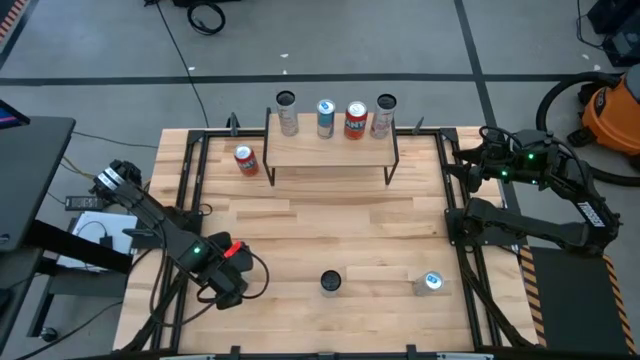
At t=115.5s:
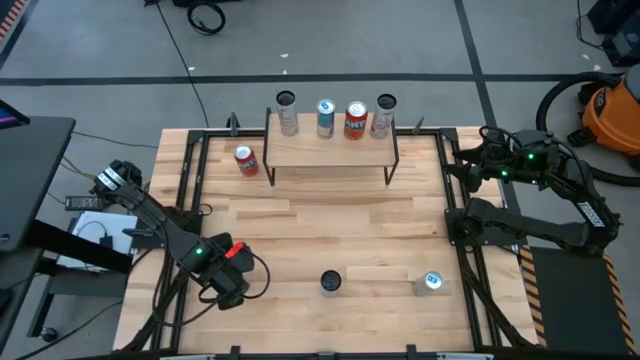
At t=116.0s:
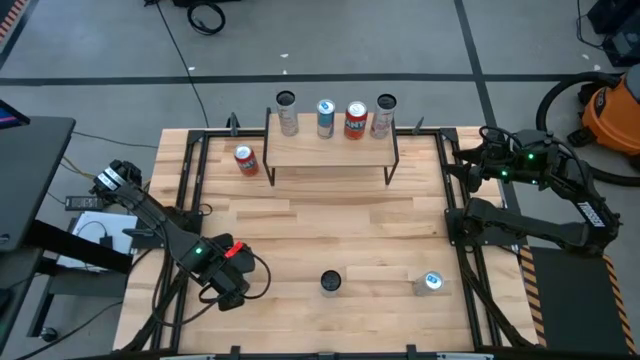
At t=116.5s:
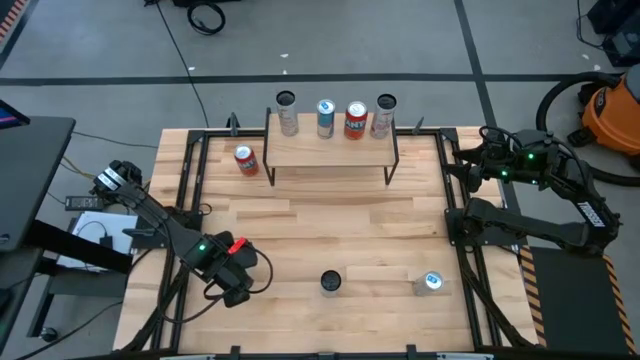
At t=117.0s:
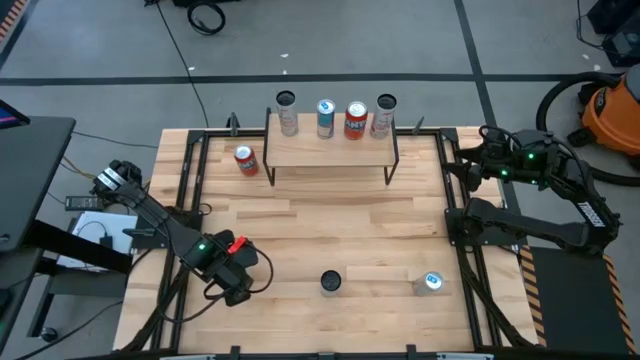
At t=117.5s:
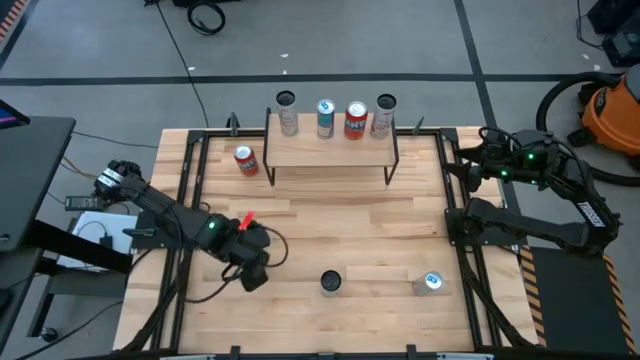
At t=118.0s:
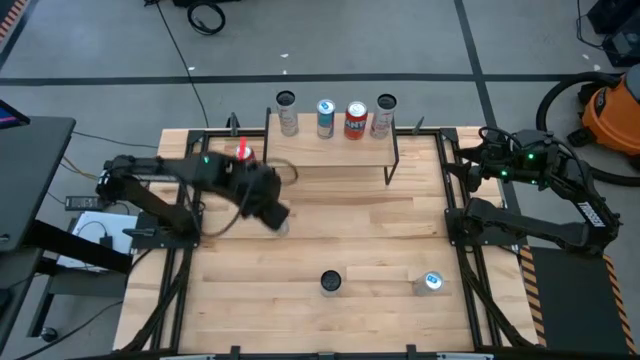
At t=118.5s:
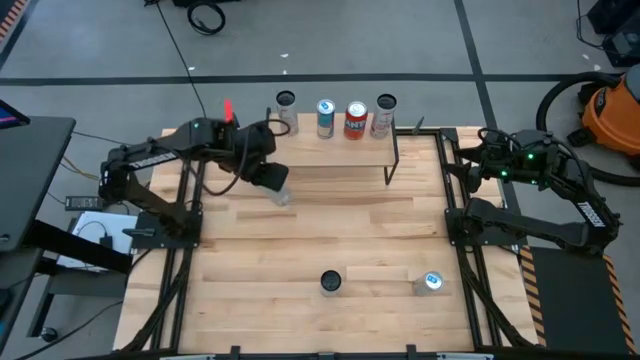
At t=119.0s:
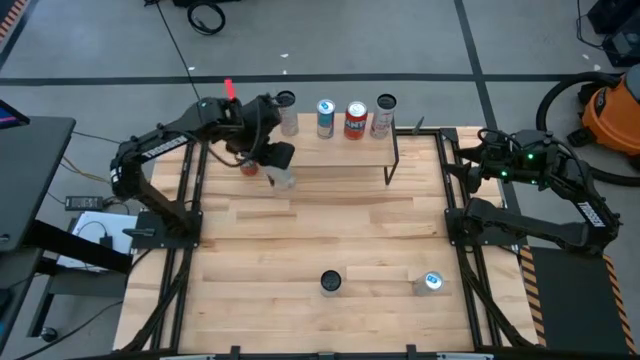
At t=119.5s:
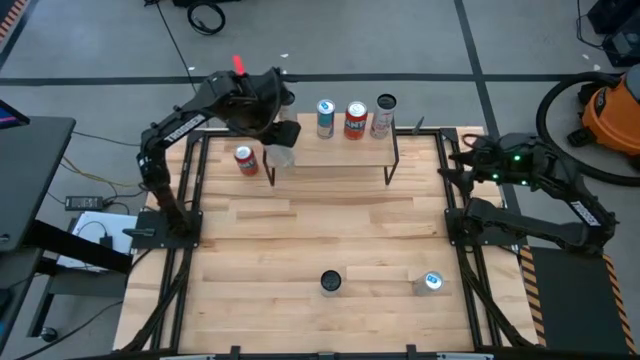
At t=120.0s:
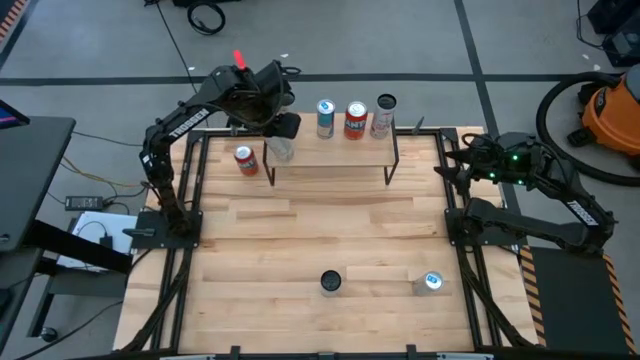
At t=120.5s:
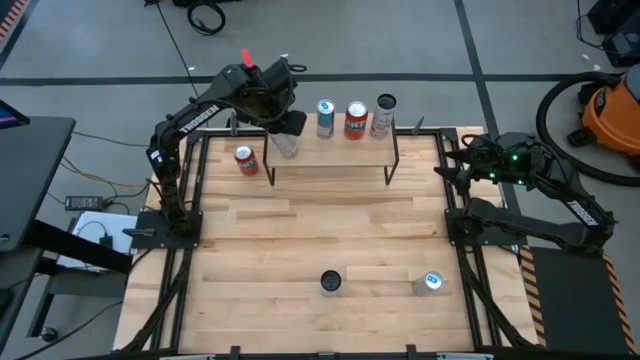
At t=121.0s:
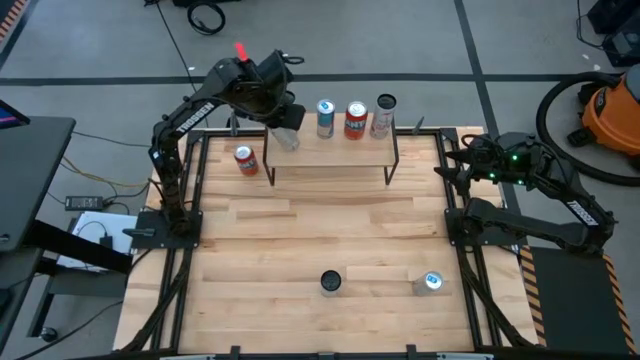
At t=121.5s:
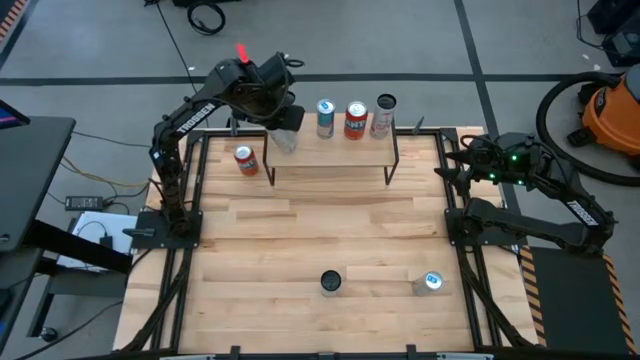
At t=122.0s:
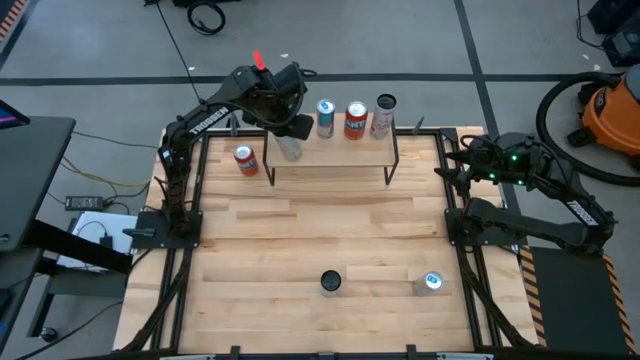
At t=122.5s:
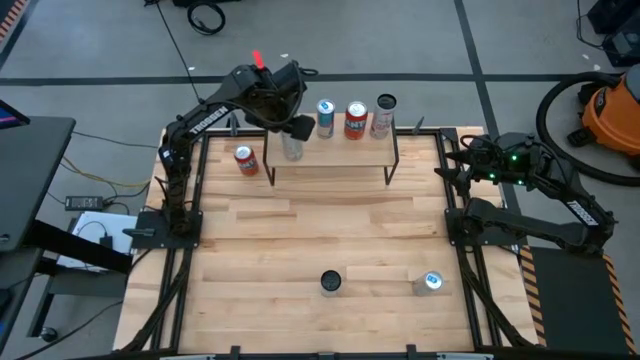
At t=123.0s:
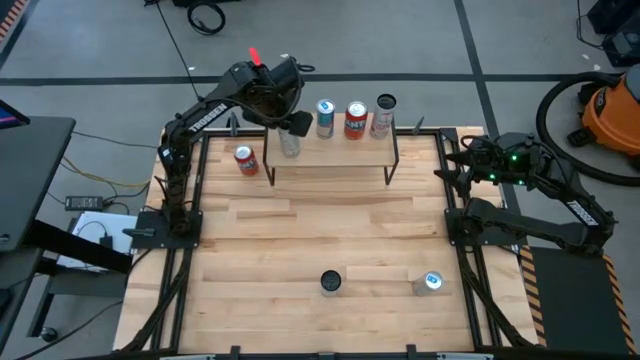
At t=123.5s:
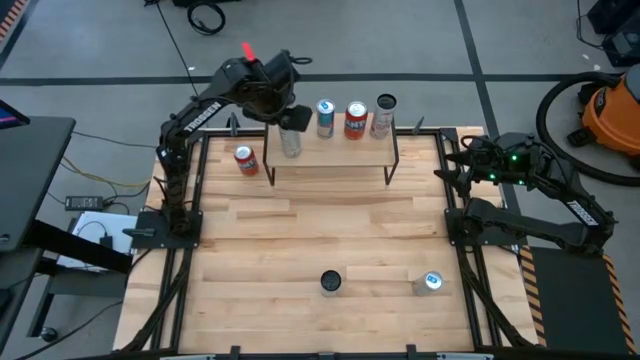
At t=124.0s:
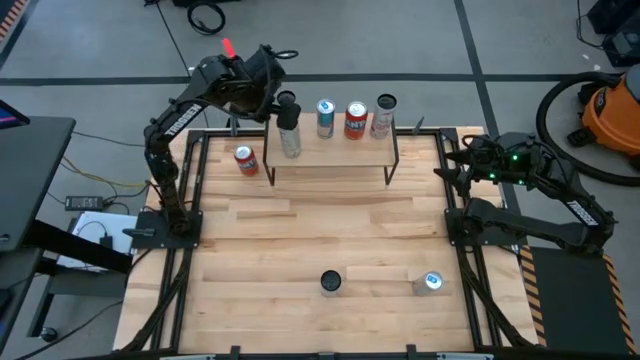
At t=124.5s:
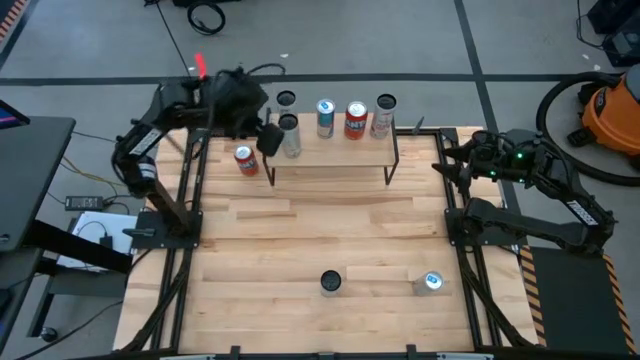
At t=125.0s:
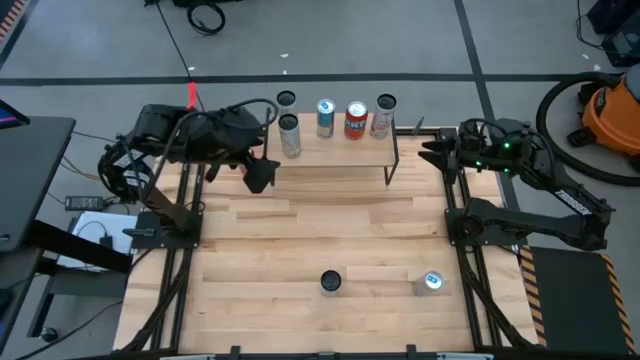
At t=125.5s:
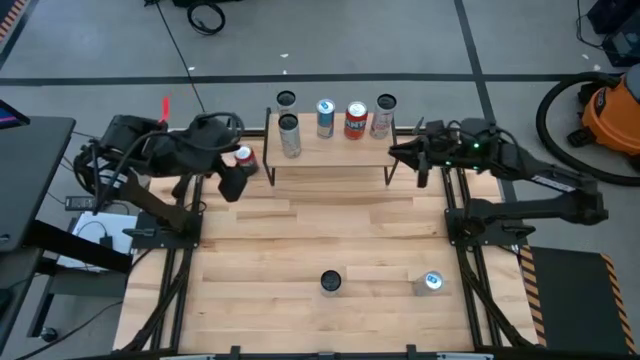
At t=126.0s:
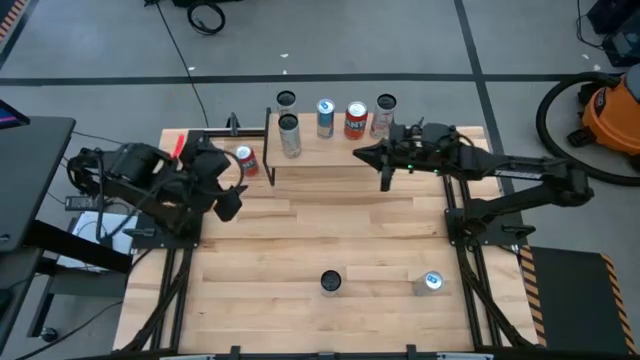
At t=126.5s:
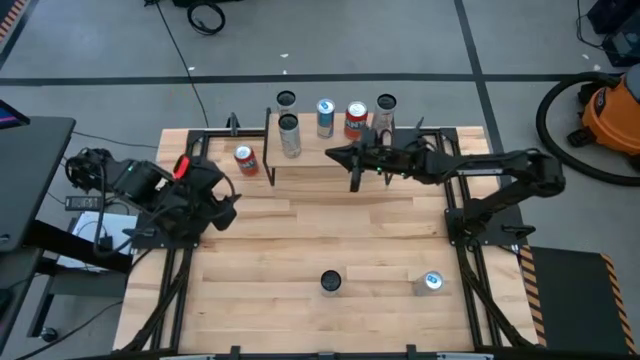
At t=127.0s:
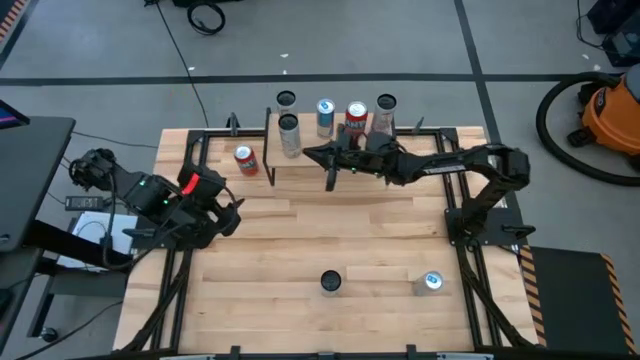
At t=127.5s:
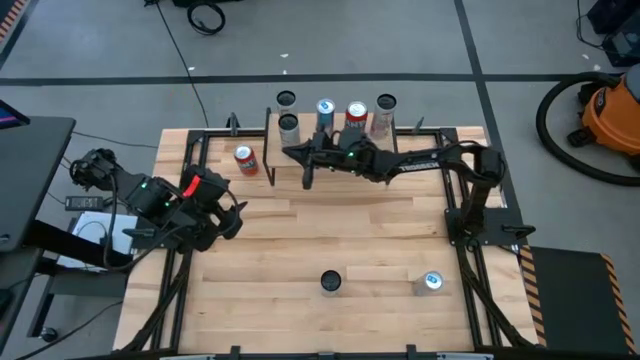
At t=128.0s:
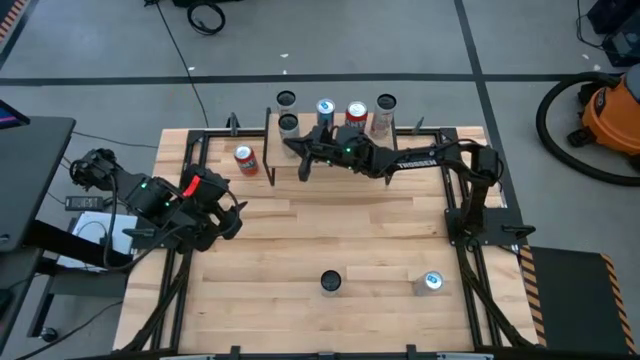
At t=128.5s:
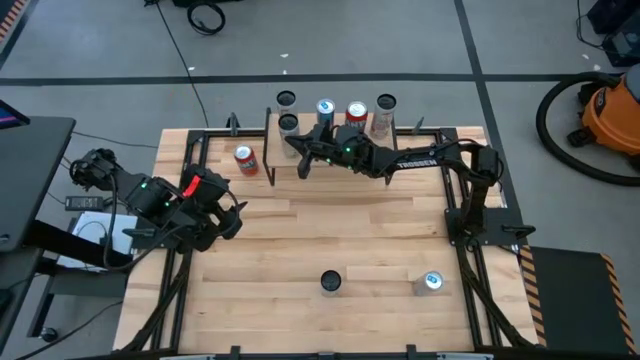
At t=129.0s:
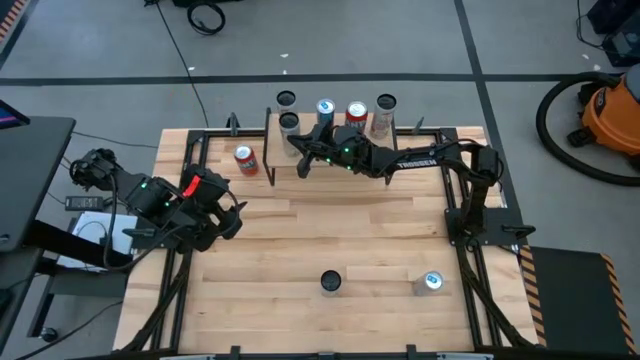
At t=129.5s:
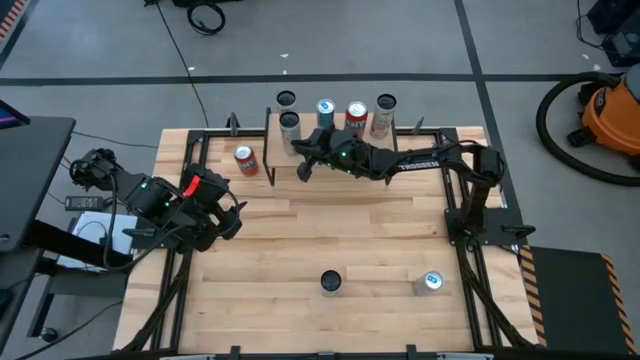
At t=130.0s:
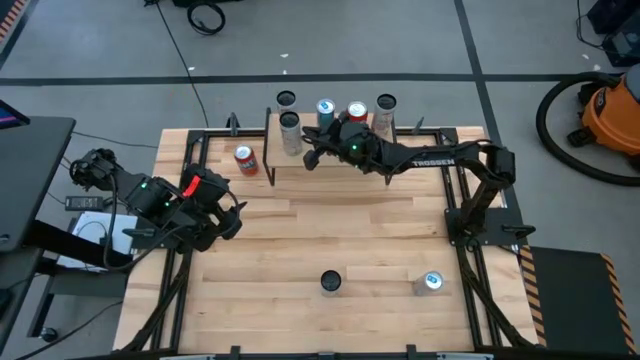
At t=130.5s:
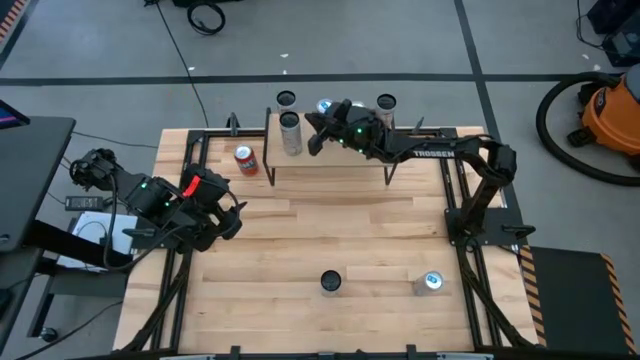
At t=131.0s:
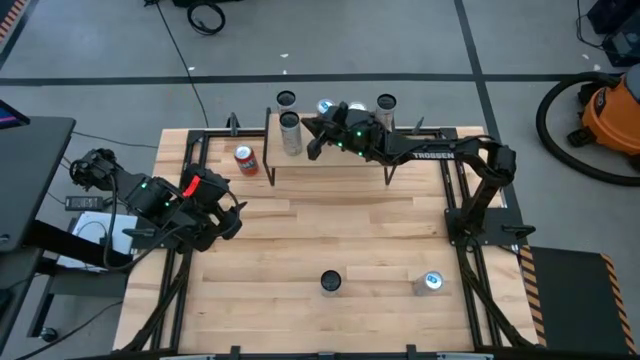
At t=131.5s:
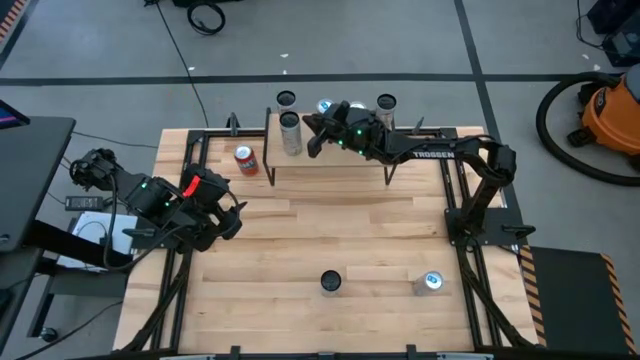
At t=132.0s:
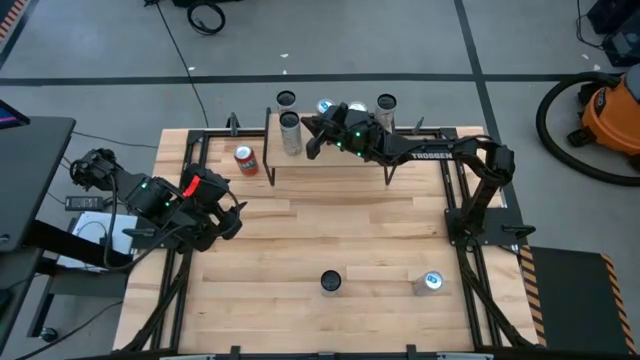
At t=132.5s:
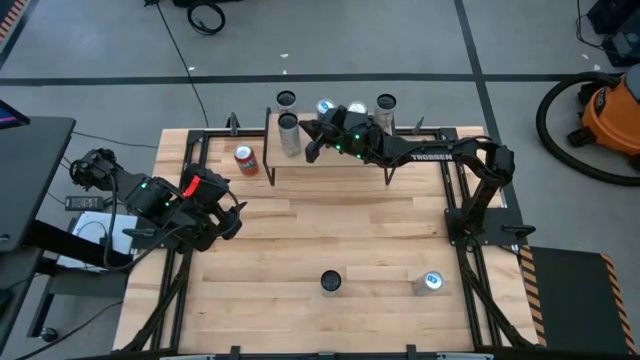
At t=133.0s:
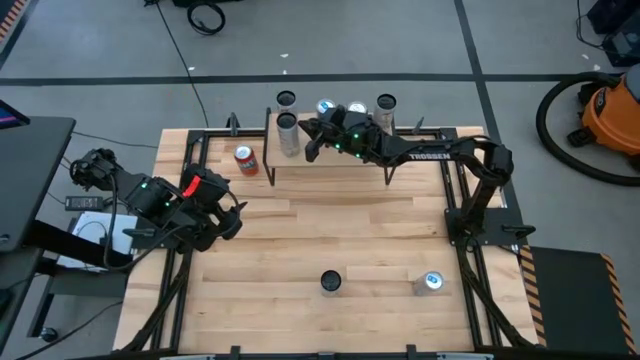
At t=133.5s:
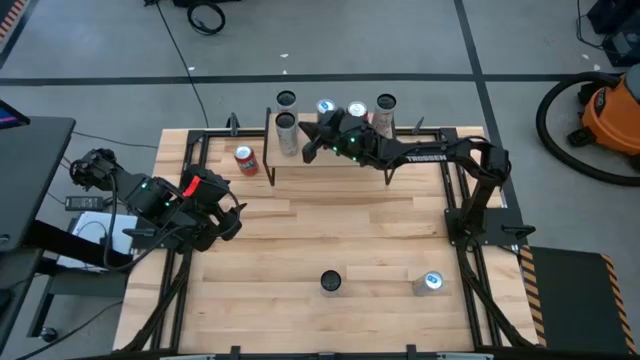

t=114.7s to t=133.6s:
Task: Place canned beverage on shelf
Put the white yellow soda can on the shelf aligned with the other white yellow soda can

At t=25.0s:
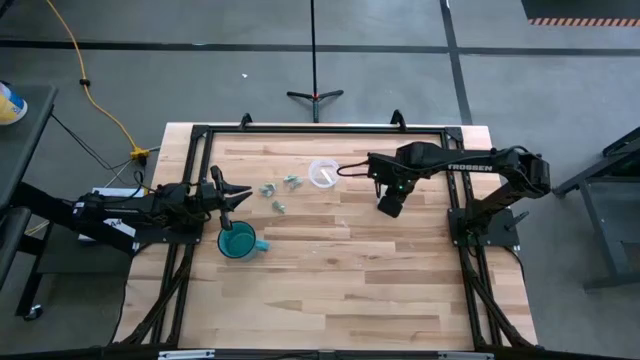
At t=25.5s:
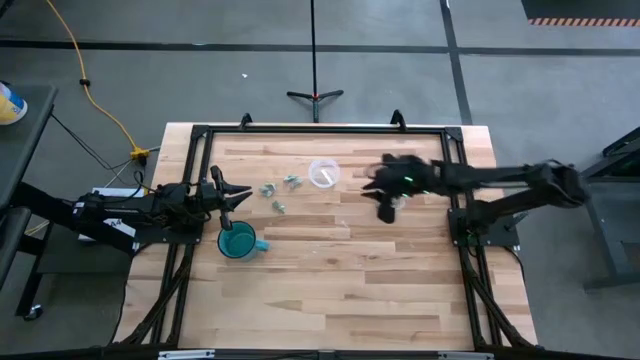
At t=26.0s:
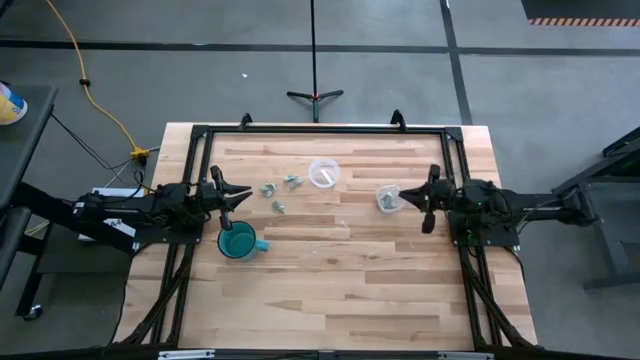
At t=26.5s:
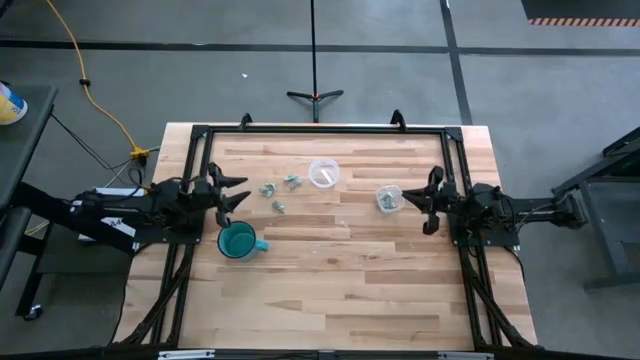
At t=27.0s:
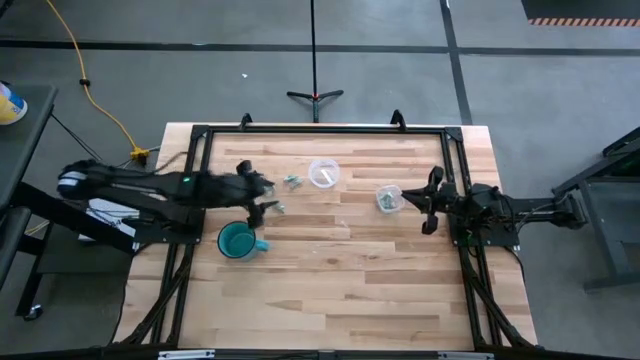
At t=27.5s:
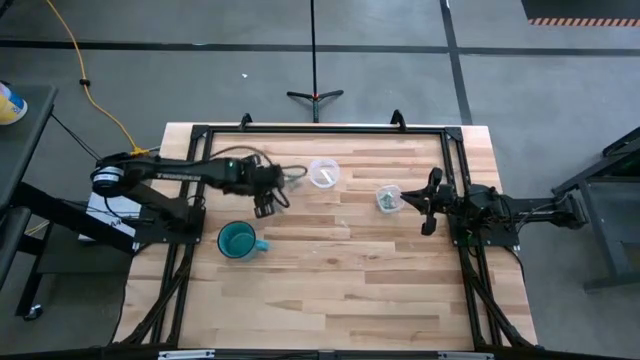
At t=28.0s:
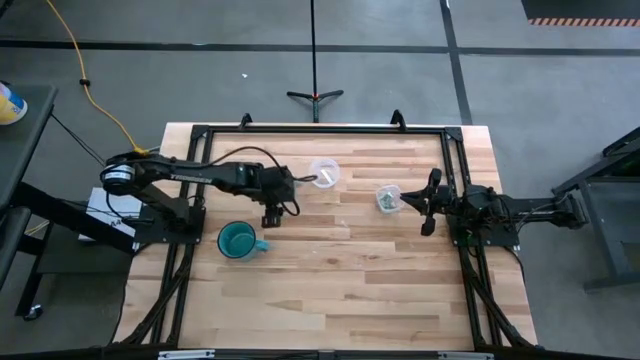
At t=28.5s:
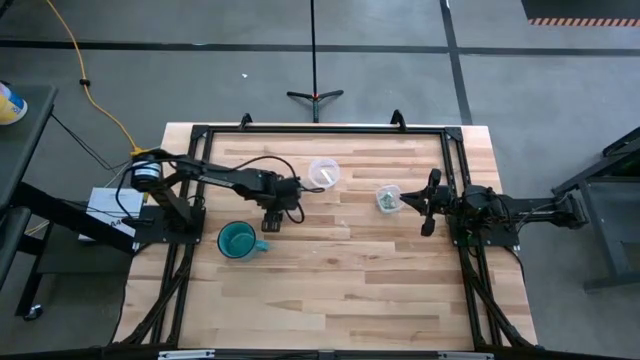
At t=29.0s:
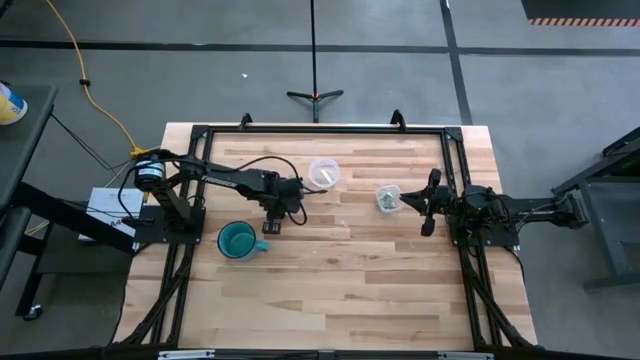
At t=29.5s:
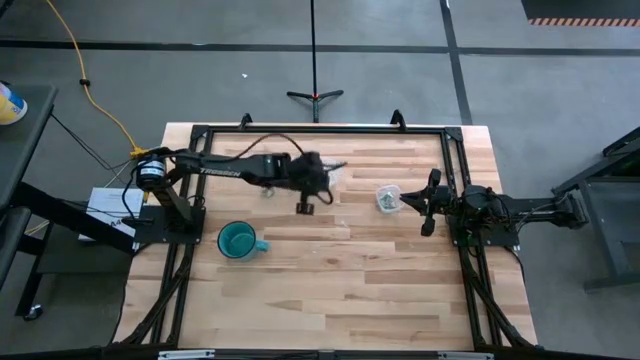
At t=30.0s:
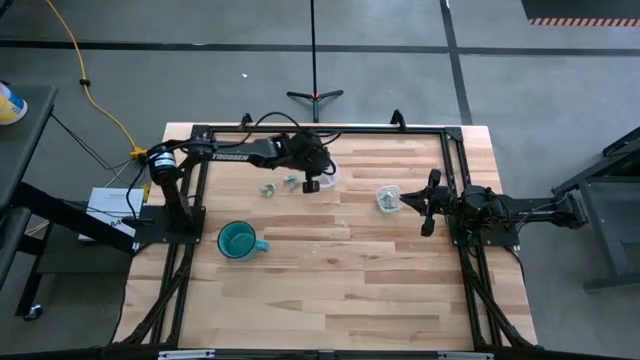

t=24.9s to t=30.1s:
Task: Pick and place items into bin
Put the stevia packet into the top transparent bin
